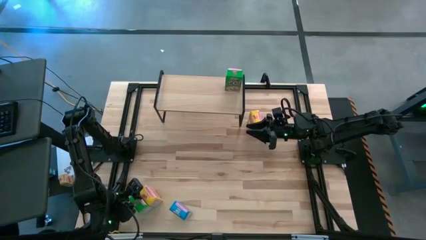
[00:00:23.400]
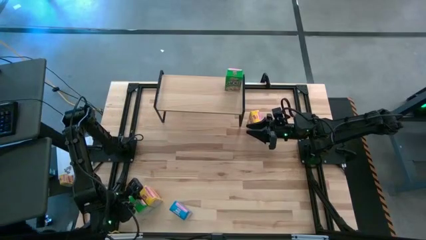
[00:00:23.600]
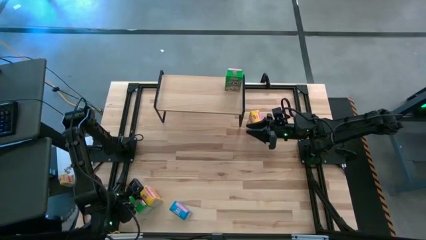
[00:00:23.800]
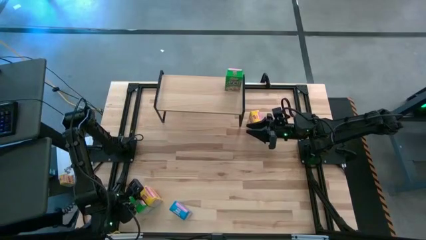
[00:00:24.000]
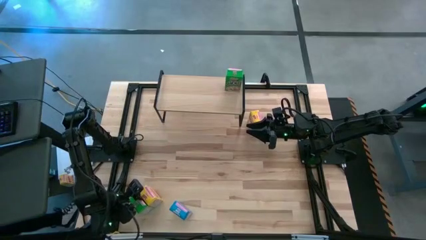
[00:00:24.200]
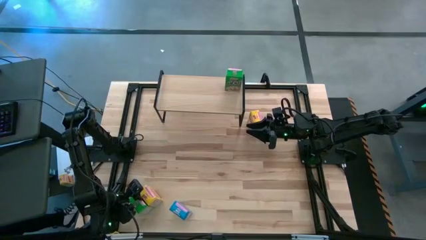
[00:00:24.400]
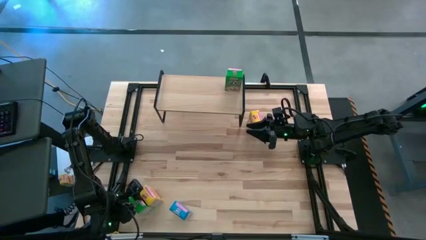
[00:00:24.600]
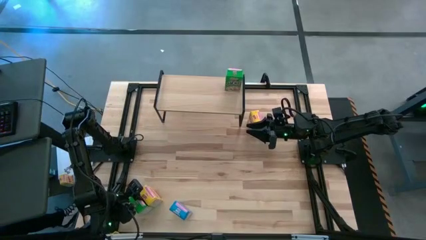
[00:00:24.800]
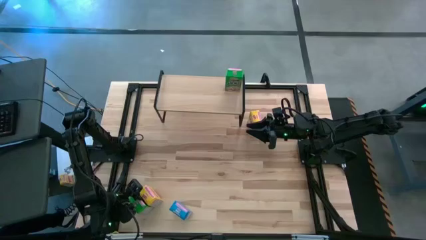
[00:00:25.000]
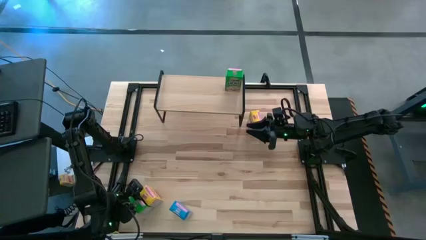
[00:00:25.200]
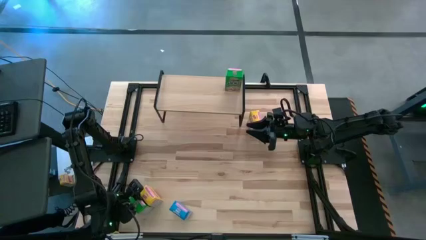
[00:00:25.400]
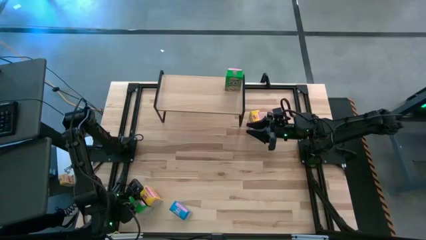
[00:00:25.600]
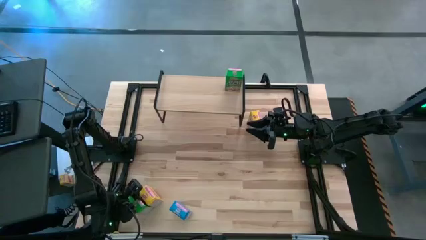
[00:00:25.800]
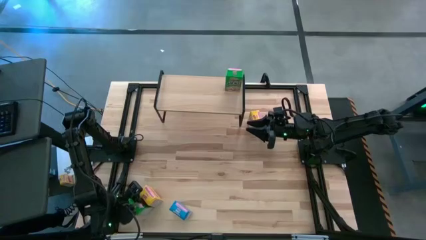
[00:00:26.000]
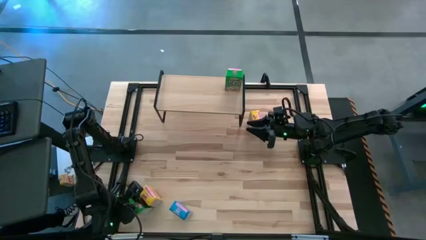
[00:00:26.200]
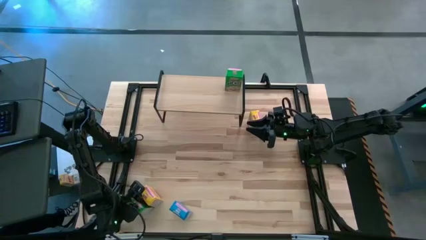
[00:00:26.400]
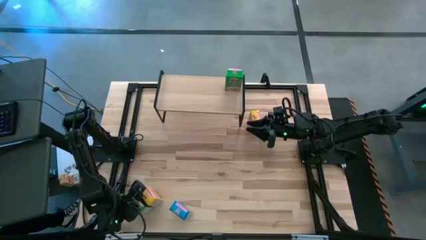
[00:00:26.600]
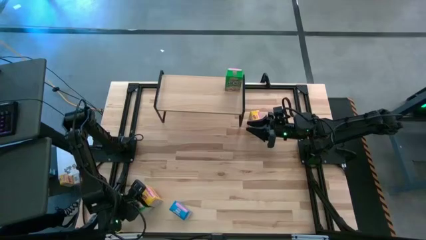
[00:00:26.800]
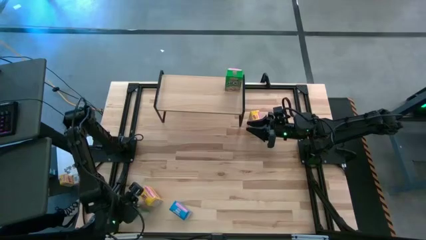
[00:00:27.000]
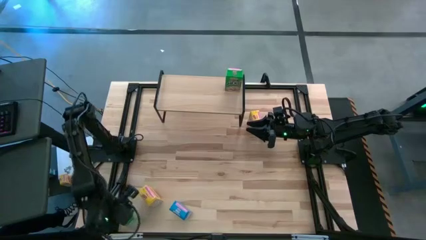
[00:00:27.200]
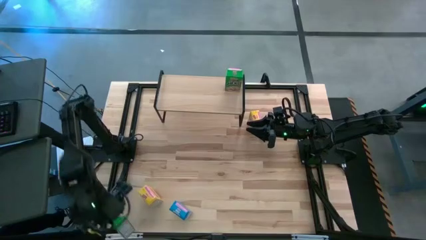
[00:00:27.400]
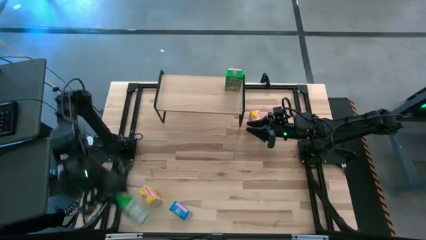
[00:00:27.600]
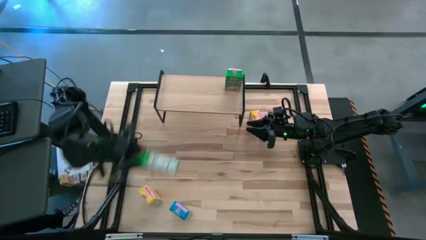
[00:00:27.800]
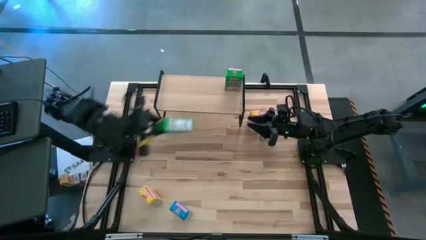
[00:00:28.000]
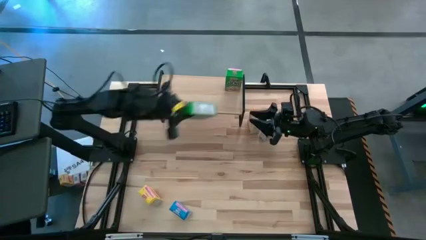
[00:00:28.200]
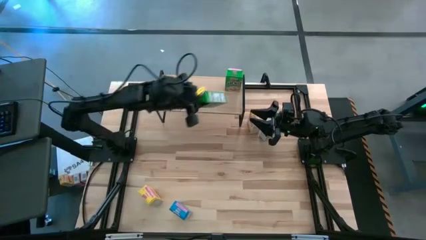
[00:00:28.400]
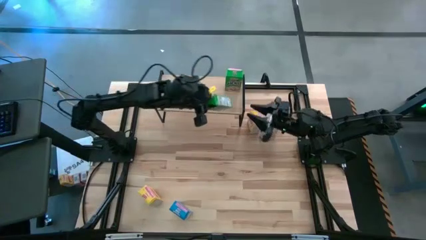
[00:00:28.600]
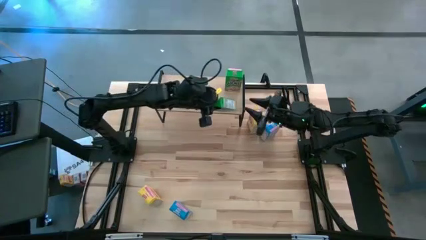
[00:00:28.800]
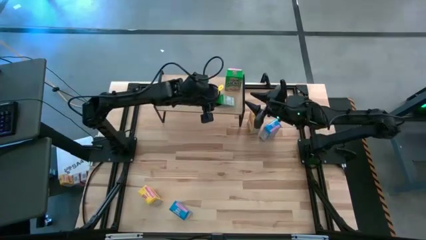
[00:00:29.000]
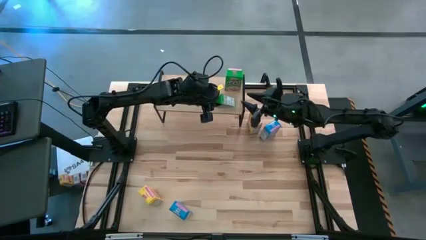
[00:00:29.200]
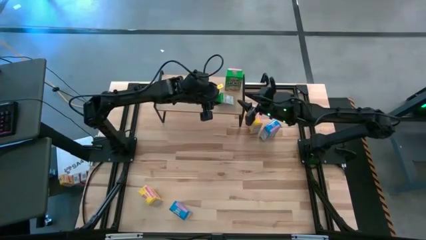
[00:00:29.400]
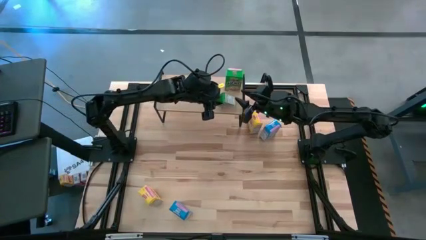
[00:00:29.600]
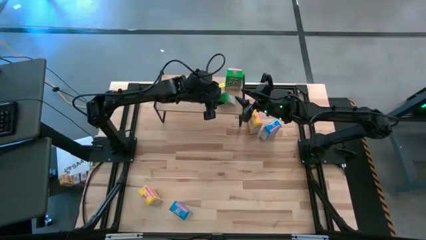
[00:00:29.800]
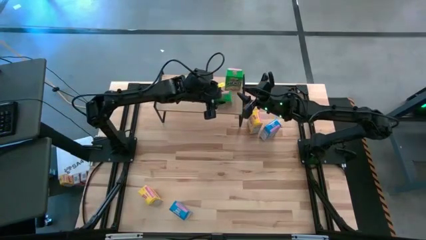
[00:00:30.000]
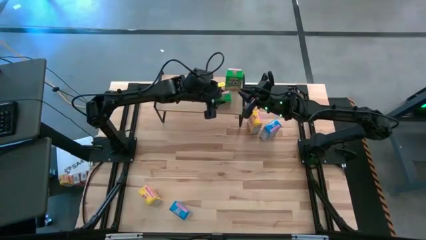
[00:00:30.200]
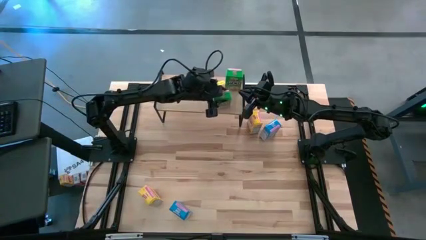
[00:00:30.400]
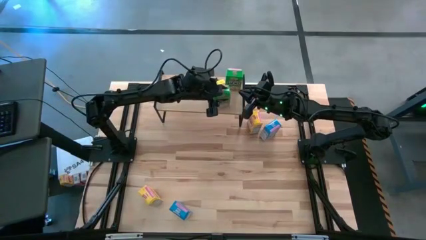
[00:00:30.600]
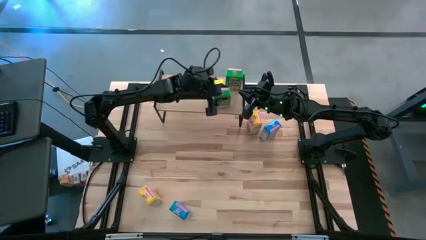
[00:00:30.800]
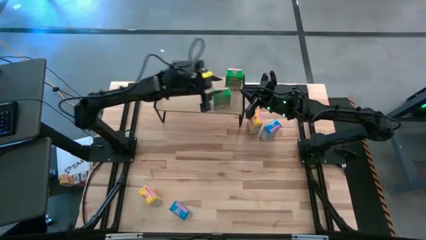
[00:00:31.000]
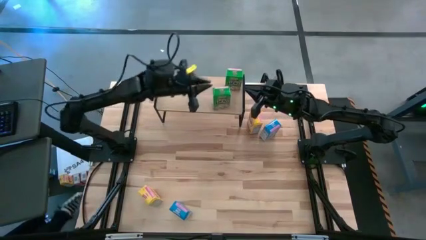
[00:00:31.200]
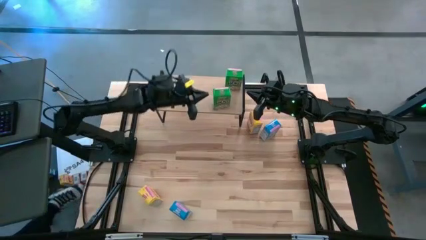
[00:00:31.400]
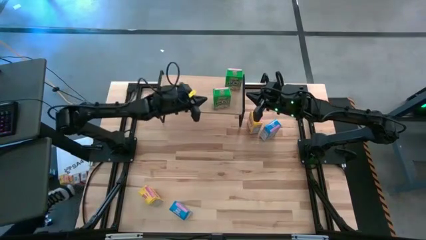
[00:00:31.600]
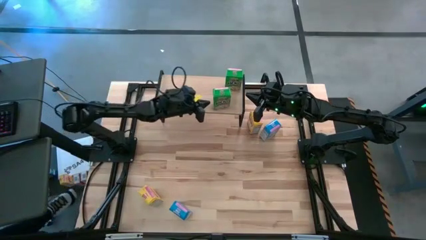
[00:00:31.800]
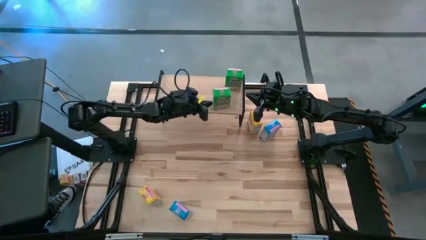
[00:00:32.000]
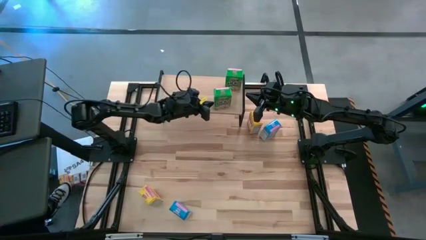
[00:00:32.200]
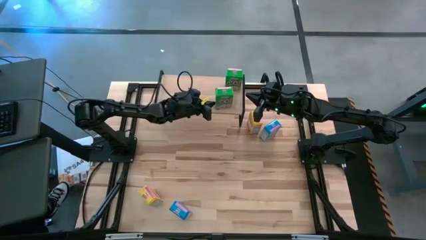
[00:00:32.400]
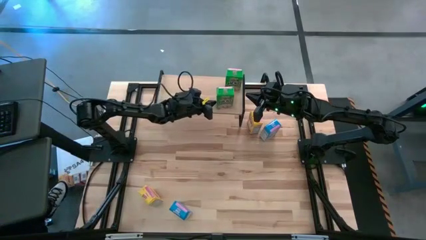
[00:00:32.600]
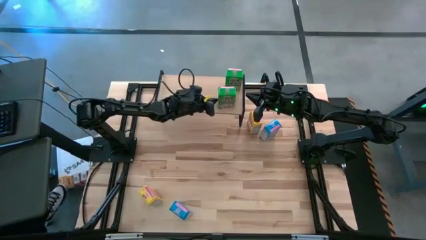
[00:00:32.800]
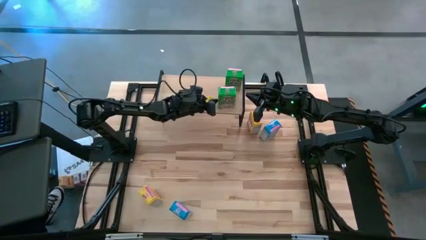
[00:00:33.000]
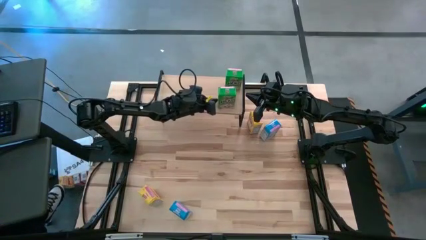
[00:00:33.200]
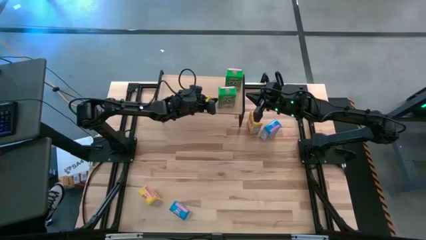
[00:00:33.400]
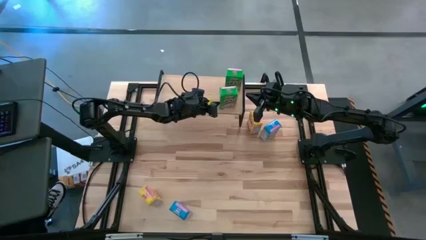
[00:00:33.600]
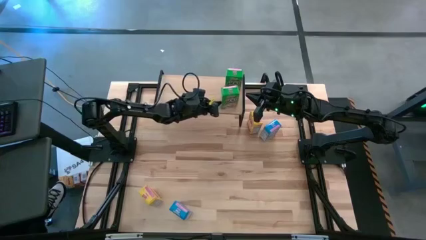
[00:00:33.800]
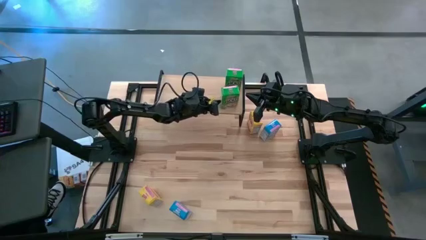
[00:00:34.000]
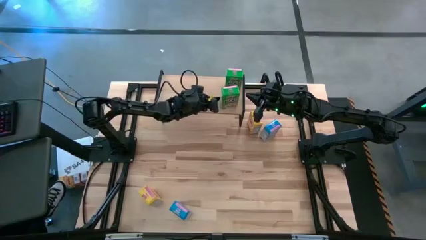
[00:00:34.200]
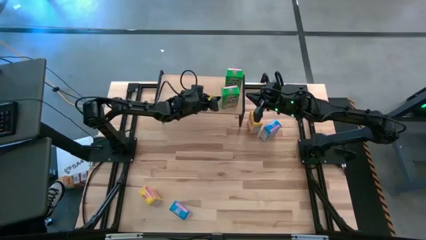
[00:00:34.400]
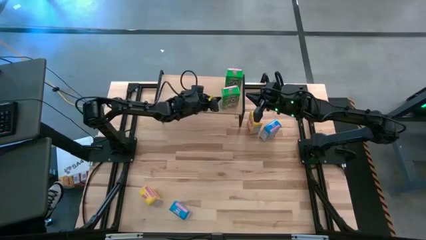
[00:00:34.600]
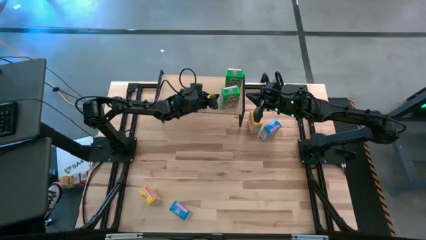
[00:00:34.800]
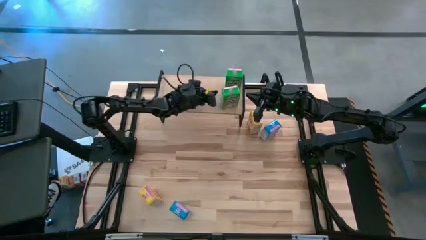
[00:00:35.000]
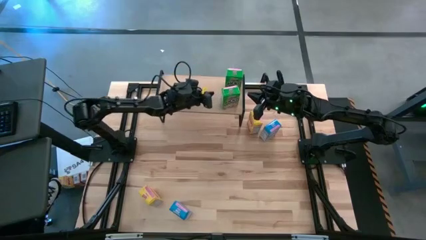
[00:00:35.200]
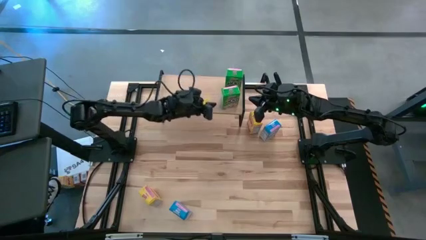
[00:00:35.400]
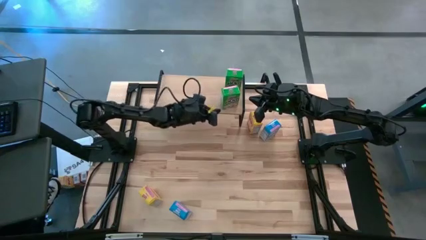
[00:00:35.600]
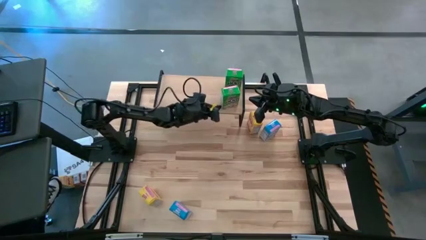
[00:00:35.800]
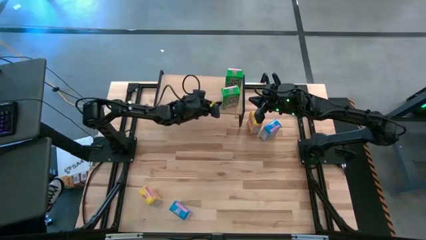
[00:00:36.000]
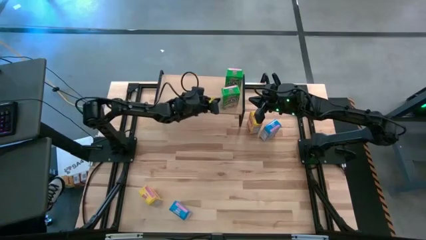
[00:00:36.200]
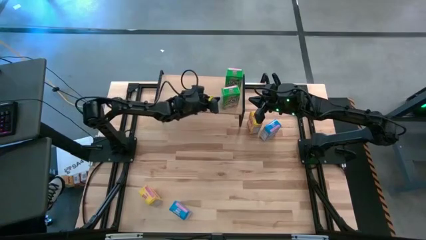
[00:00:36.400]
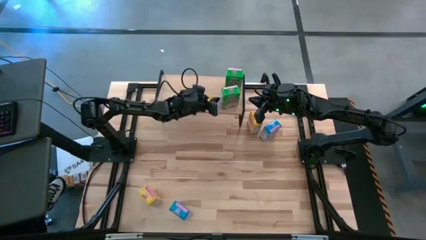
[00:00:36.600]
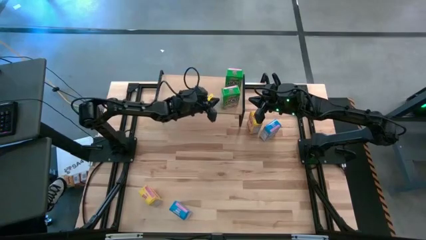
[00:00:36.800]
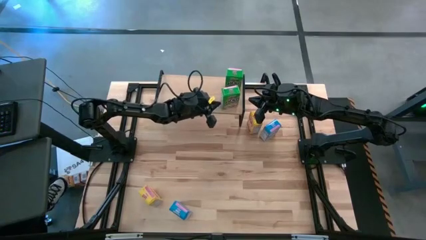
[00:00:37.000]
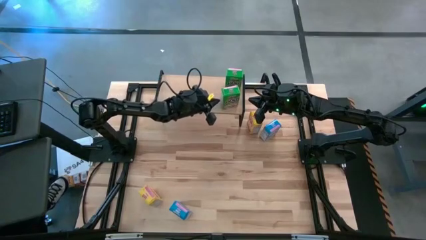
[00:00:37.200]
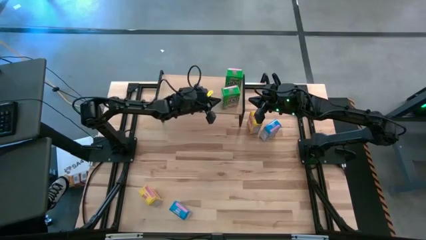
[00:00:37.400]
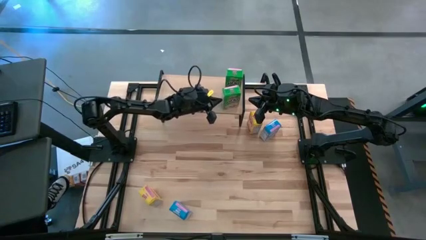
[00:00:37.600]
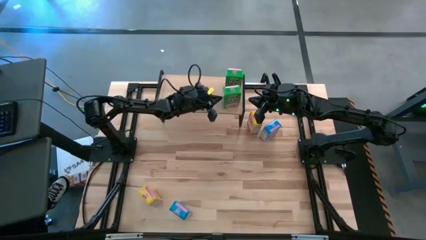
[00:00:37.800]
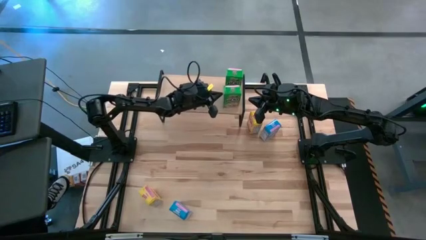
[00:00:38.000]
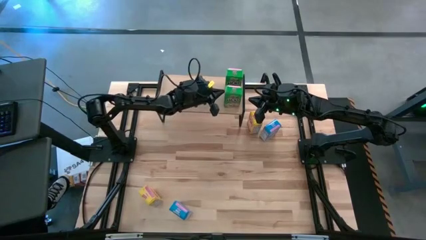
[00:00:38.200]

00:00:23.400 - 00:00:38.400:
Task: Stack cereal on shelf
Put the green cereal box on the shelf aligned with the other green cereal box
